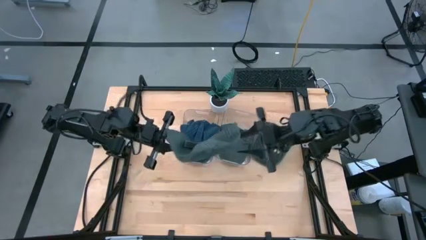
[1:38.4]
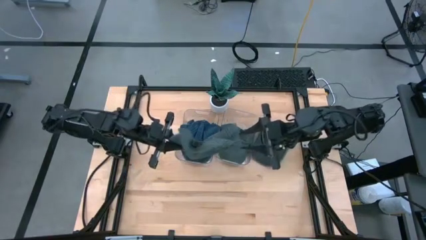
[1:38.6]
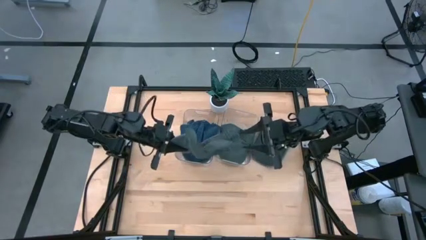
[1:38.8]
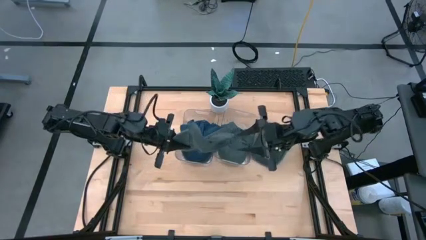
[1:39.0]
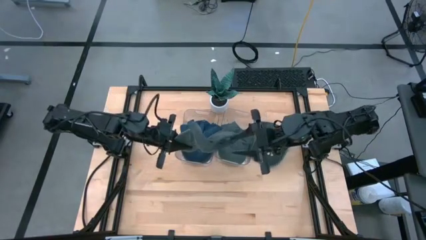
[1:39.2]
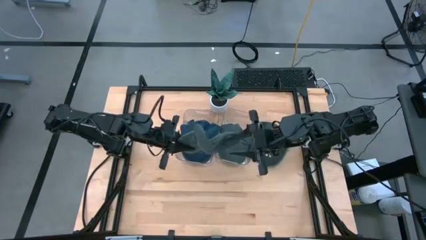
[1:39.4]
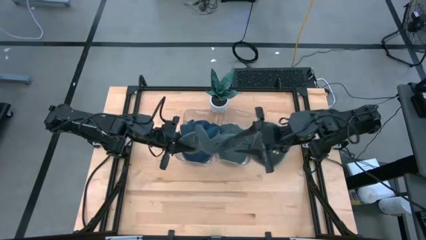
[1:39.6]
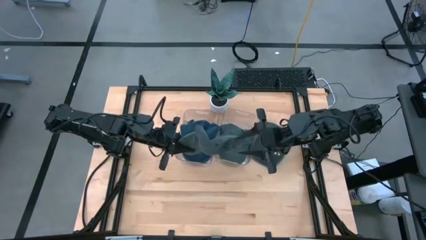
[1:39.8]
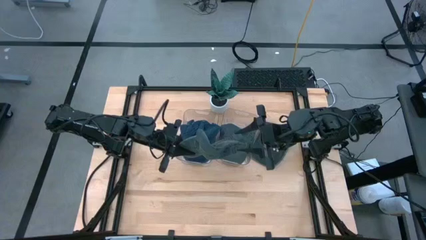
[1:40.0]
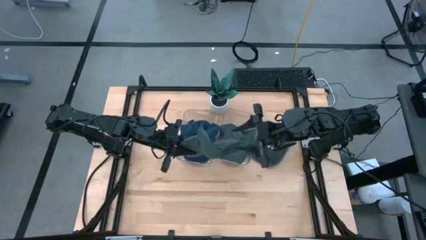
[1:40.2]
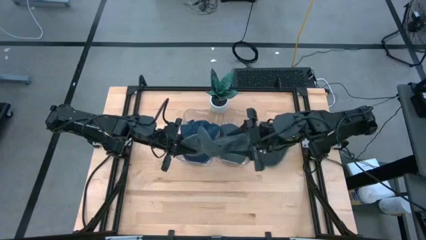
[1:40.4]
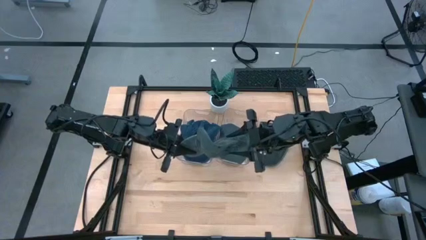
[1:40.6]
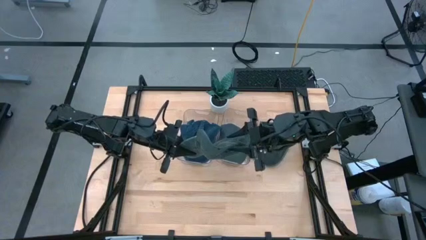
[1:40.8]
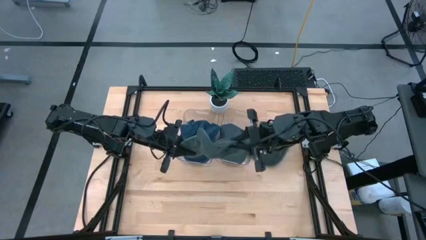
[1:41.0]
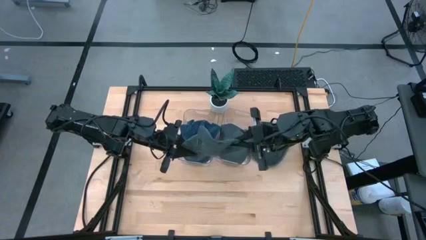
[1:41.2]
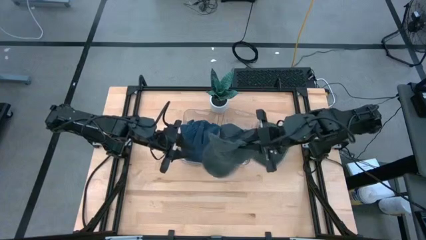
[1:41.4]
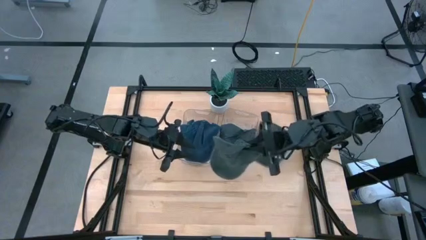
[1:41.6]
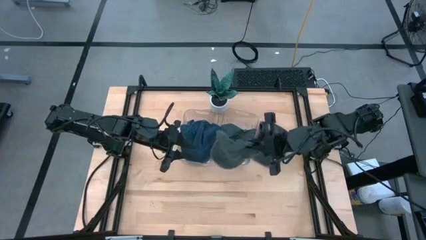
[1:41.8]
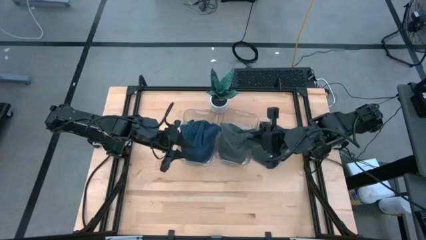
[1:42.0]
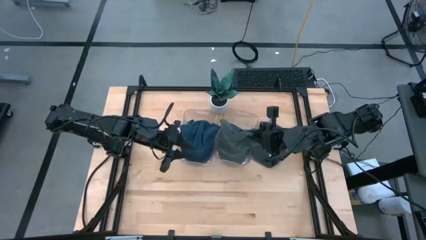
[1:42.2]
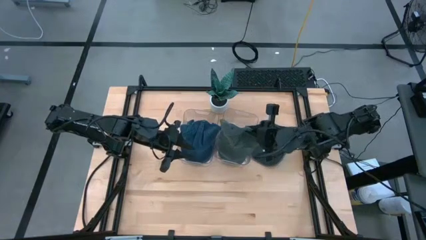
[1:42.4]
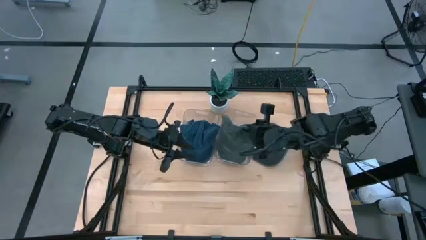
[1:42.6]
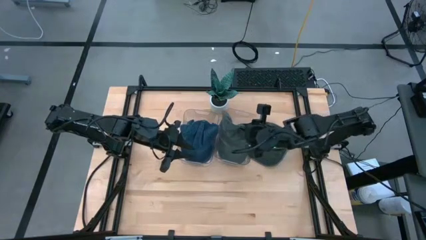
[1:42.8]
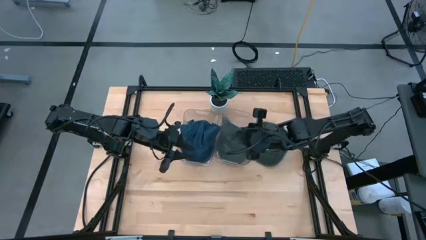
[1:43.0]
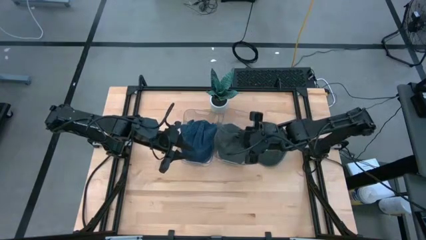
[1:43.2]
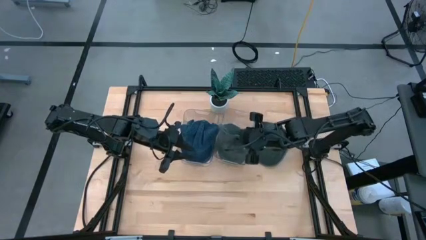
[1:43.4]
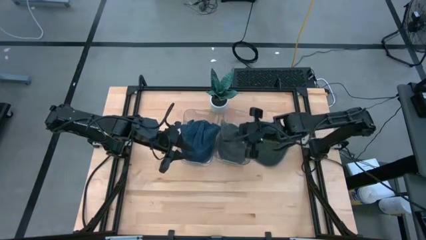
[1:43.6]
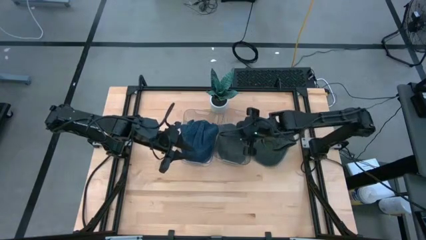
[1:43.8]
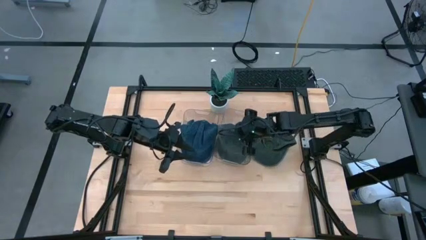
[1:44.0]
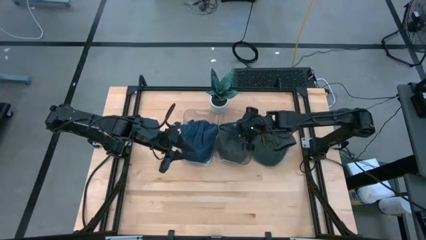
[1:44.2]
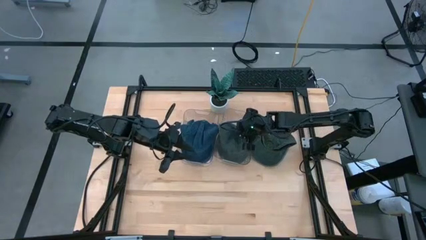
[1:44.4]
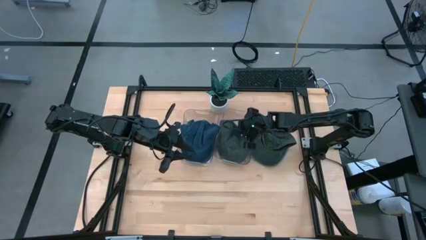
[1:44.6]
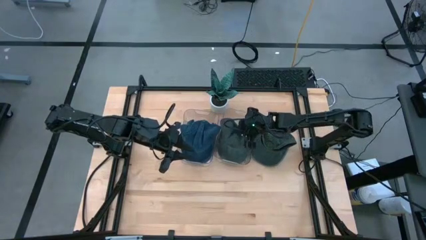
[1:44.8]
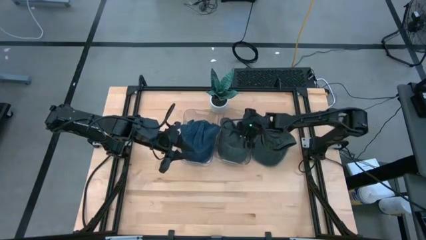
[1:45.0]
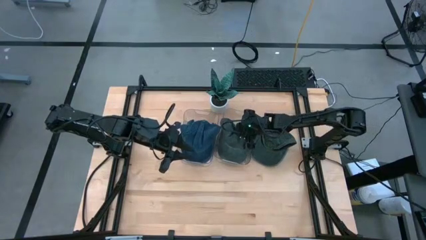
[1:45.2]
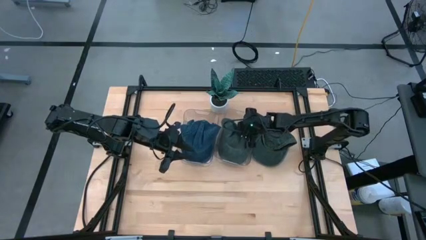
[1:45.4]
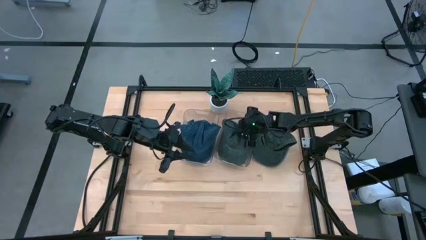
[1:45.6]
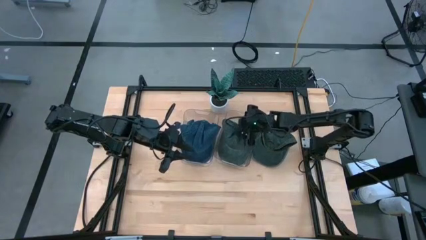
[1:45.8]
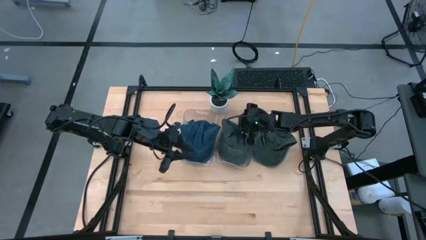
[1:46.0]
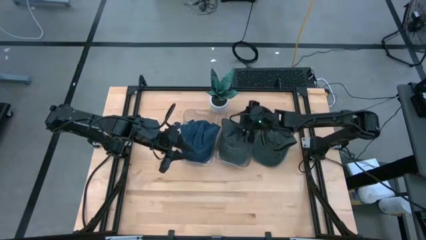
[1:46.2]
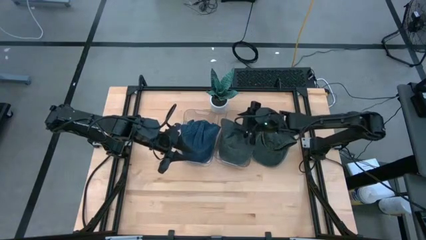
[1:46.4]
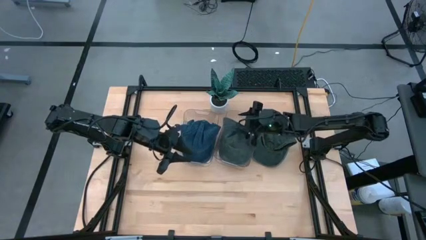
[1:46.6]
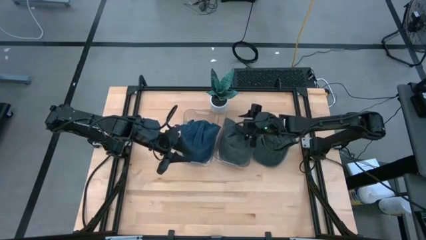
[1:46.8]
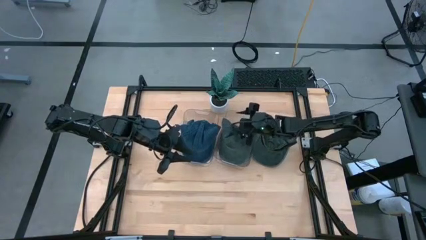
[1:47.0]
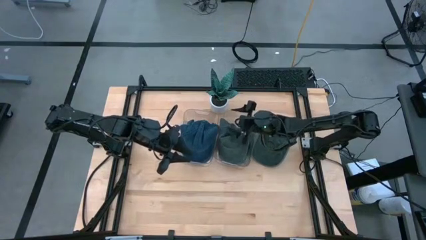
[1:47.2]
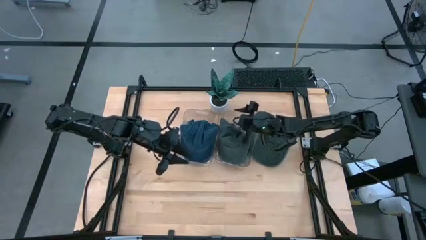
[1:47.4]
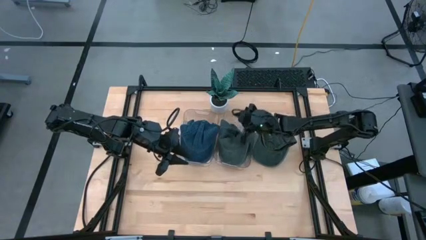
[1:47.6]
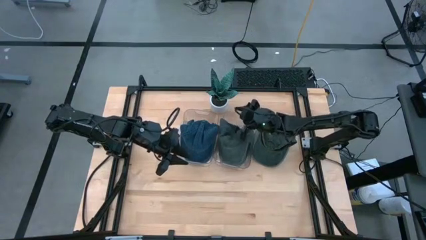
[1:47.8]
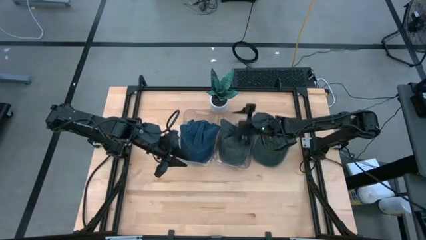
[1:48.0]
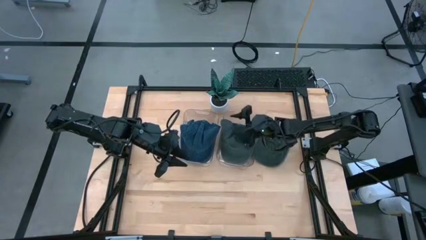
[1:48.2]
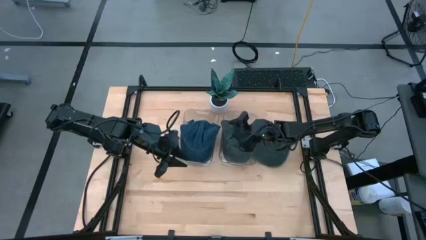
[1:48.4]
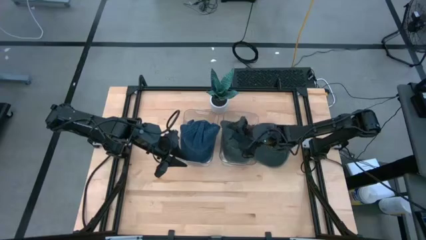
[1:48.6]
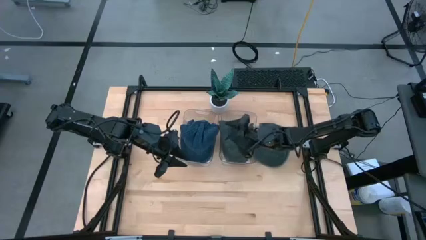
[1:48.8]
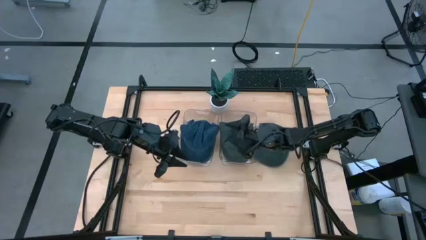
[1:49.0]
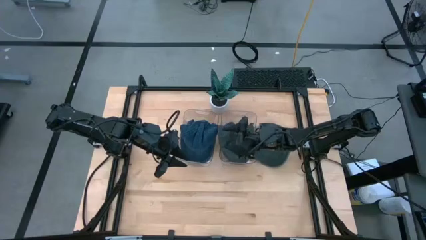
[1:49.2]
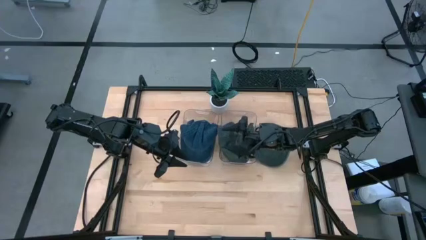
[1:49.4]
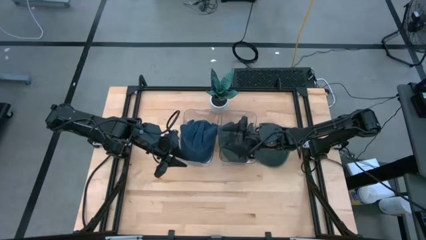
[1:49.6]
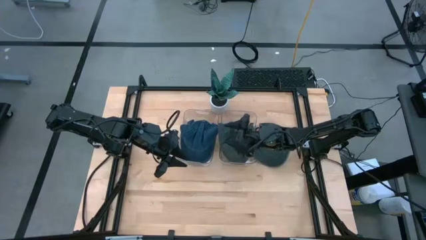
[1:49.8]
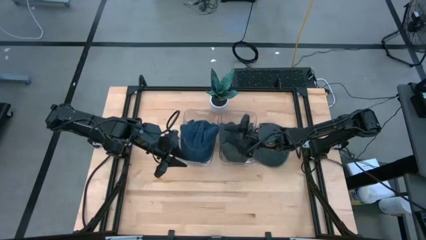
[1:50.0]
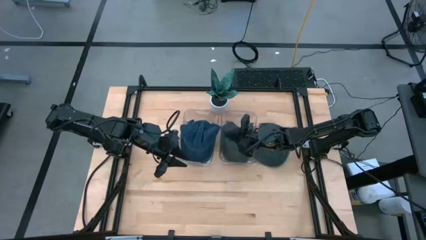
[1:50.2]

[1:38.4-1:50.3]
Task: Pick & Place hat
Put the bottom gray cap into the right transparent bin

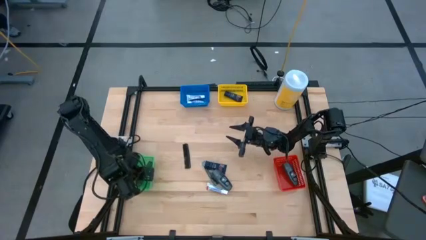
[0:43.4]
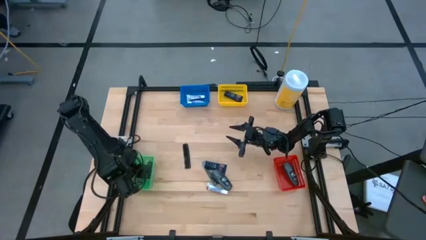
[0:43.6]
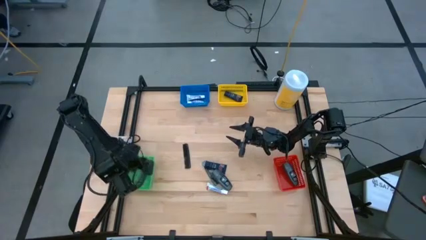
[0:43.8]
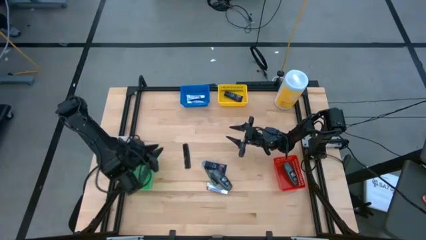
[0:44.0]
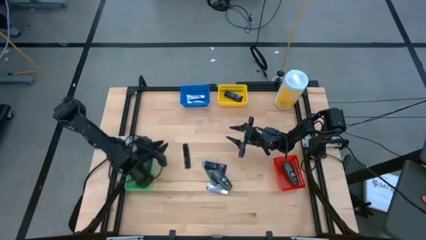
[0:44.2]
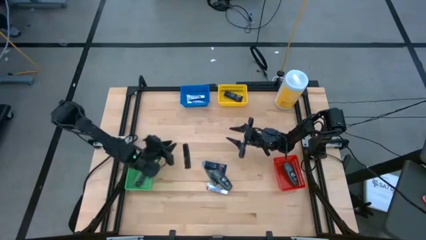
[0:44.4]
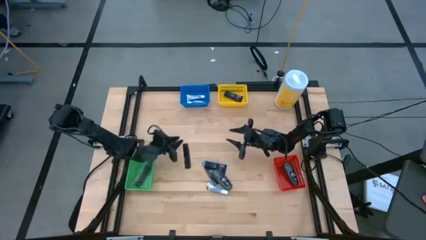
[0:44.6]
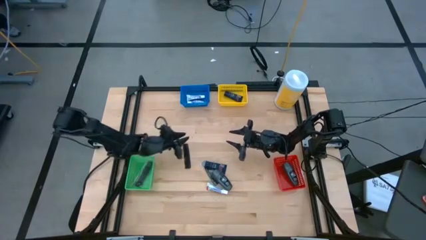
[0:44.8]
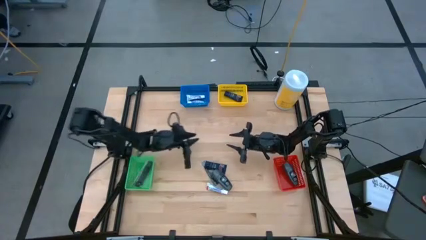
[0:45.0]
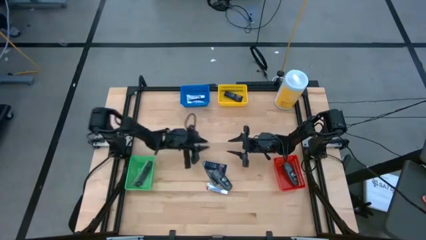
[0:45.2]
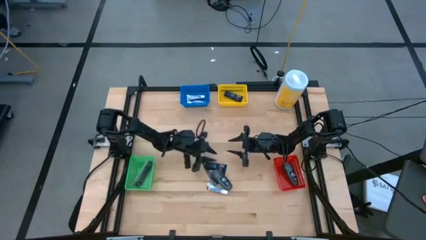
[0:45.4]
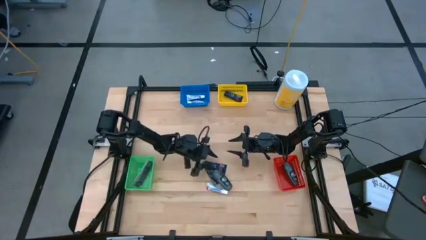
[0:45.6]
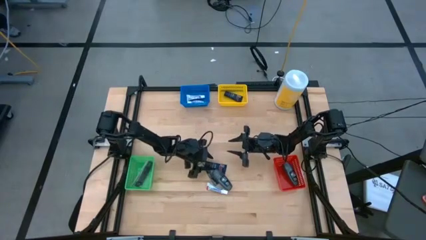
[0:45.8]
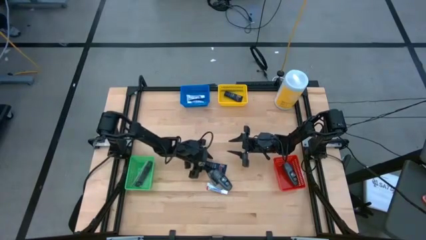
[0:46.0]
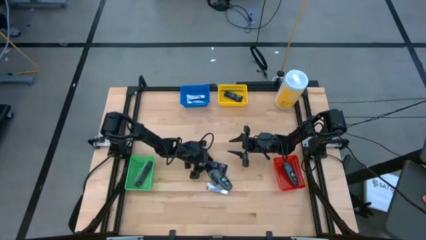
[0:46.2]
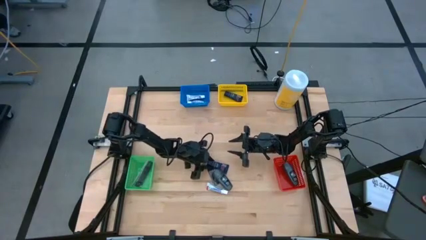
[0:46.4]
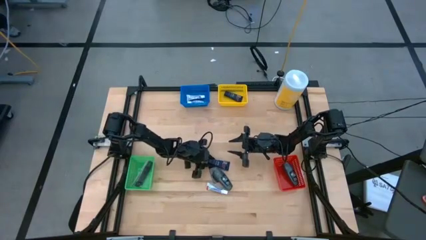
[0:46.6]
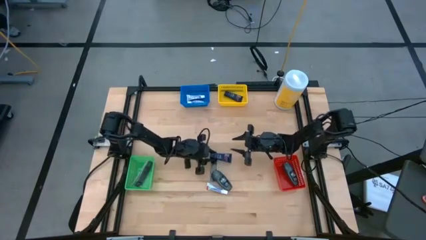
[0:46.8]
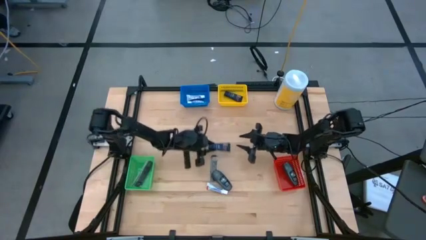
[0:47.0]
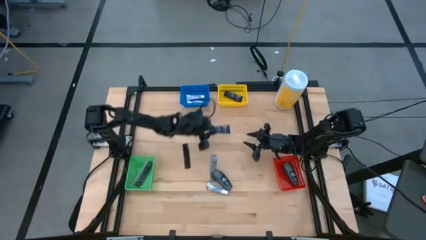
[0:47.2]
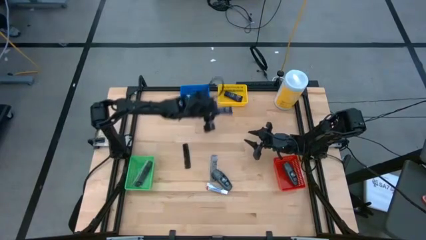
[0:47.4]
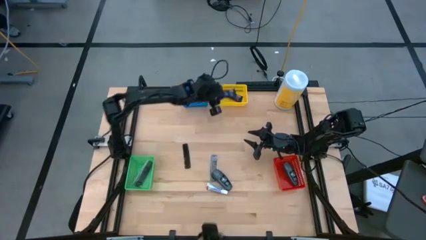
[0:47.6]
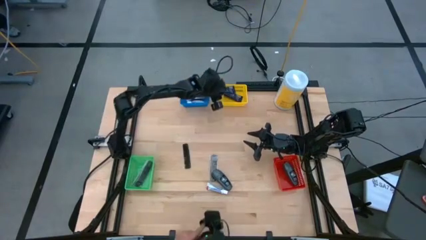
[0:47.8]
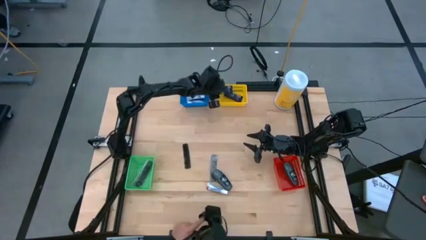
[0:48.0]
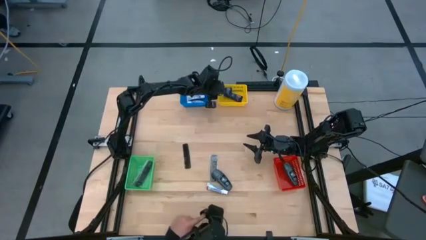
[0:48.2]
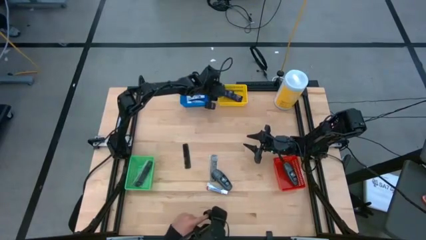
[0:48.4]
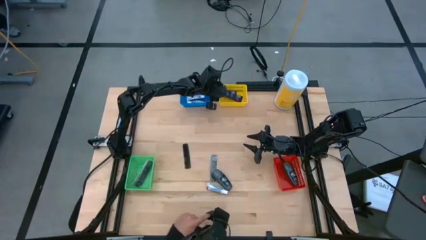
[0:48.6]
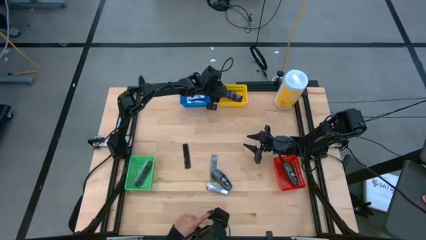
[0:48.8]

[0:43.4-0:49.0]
Task: Pick & Place Travel size toiletries
Put the blue shaving cream into the yellow bin
